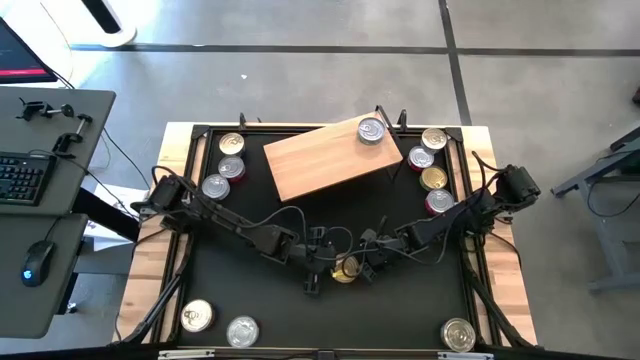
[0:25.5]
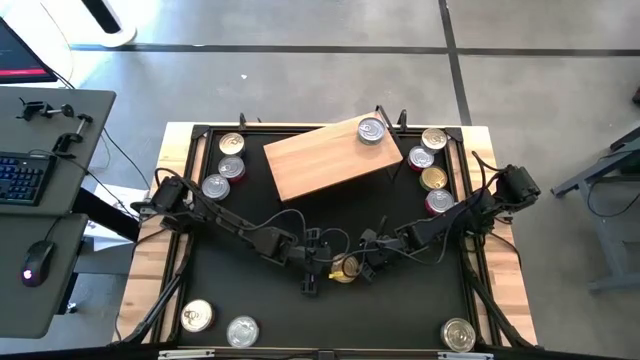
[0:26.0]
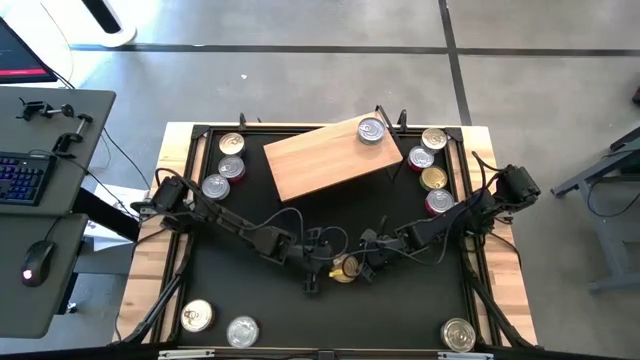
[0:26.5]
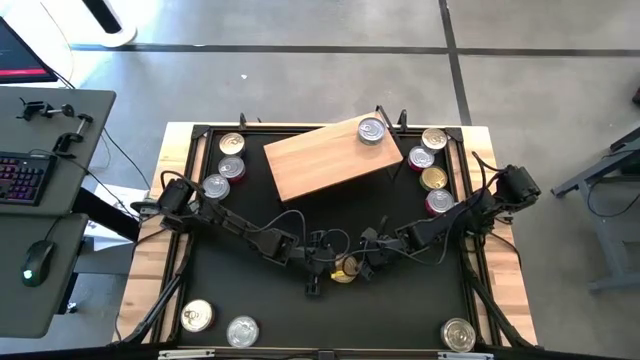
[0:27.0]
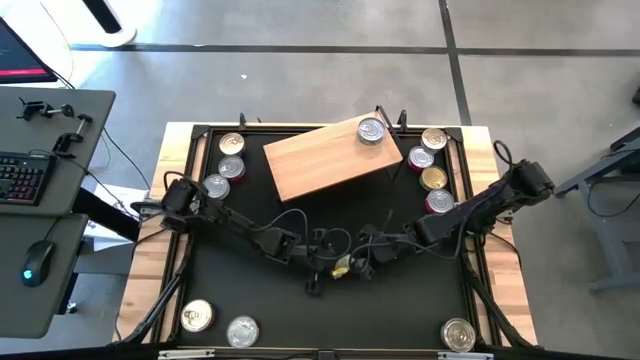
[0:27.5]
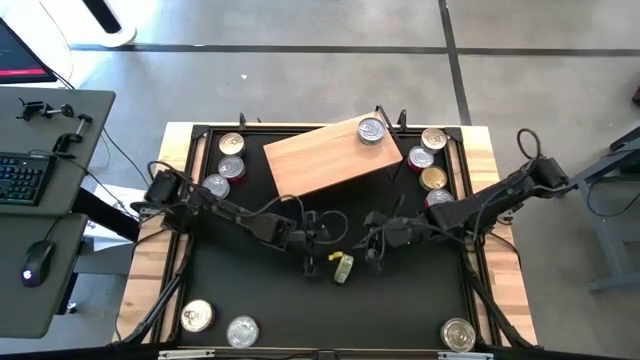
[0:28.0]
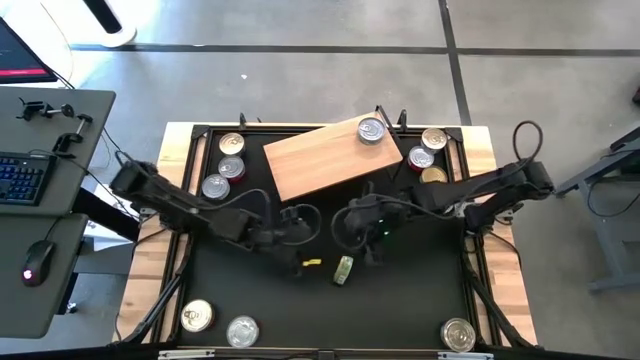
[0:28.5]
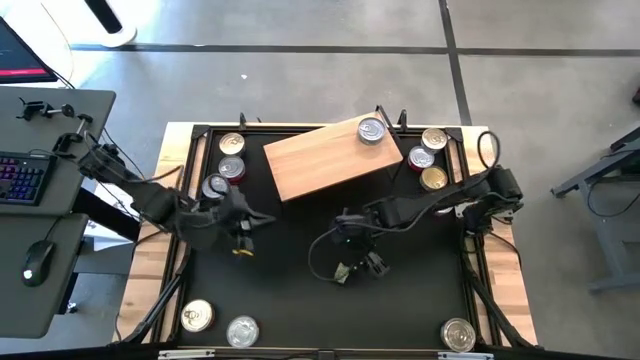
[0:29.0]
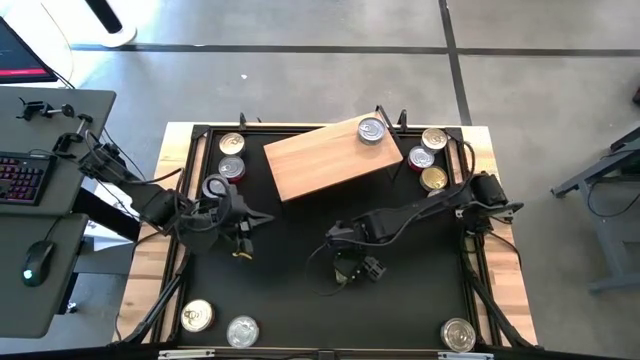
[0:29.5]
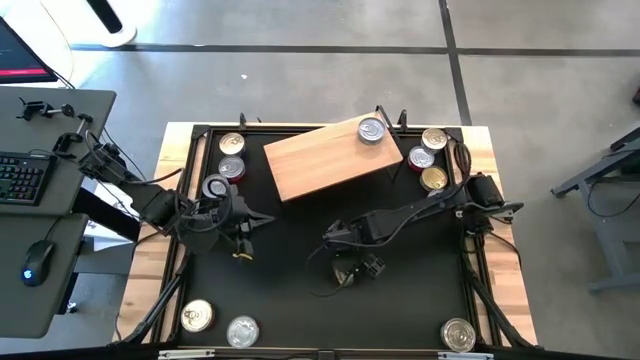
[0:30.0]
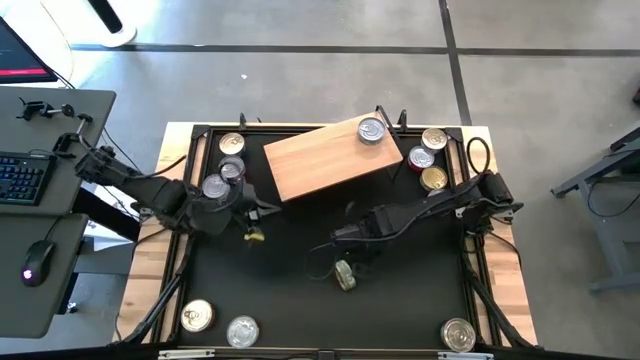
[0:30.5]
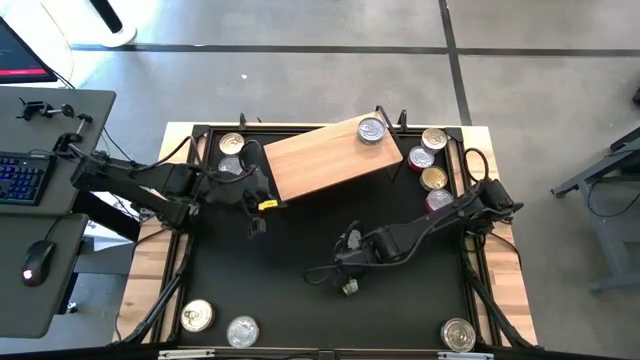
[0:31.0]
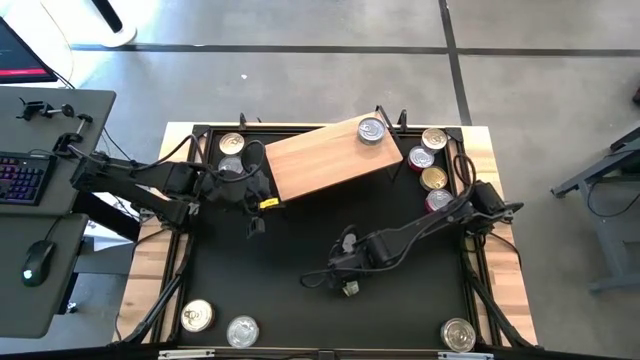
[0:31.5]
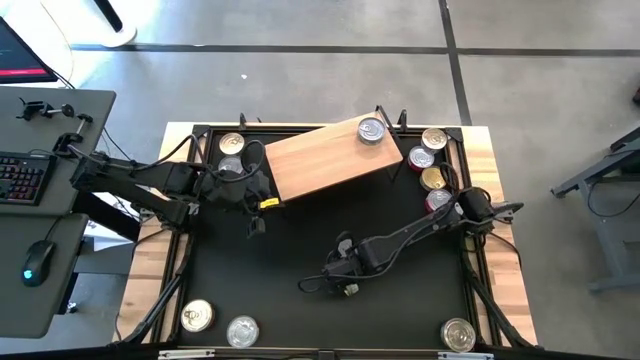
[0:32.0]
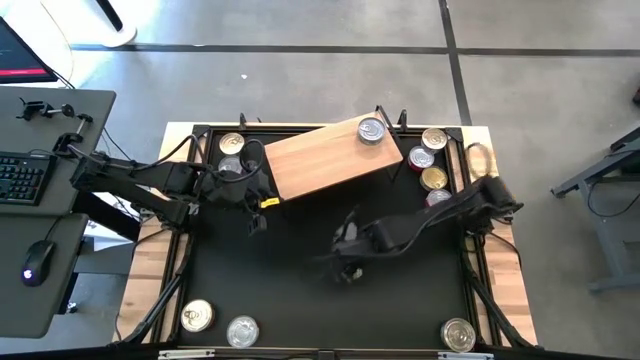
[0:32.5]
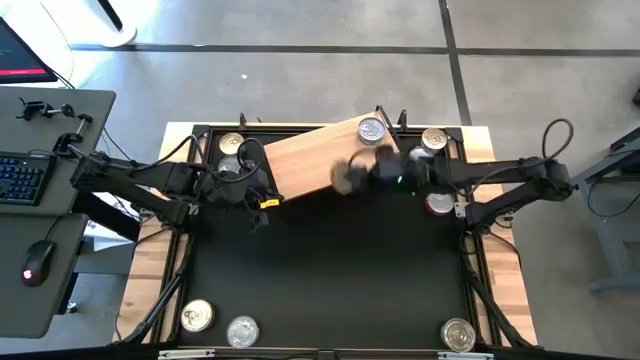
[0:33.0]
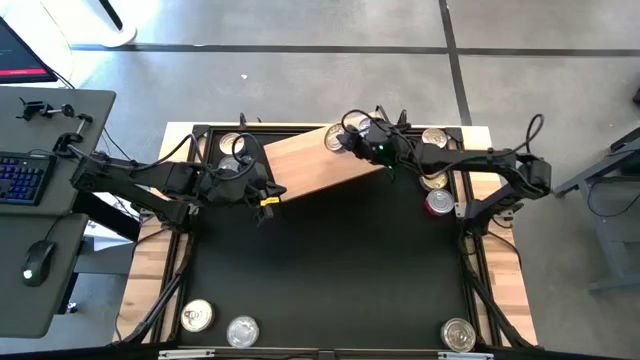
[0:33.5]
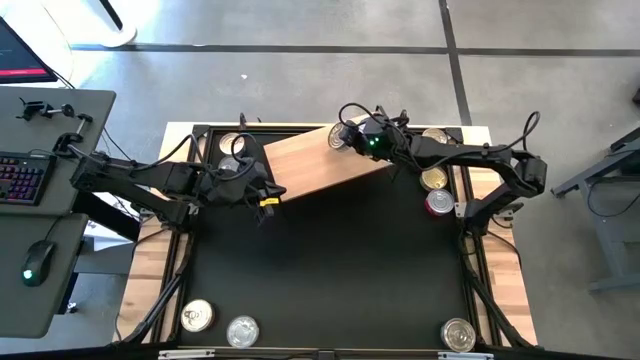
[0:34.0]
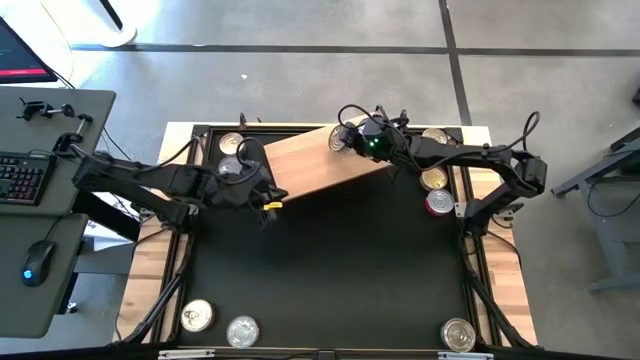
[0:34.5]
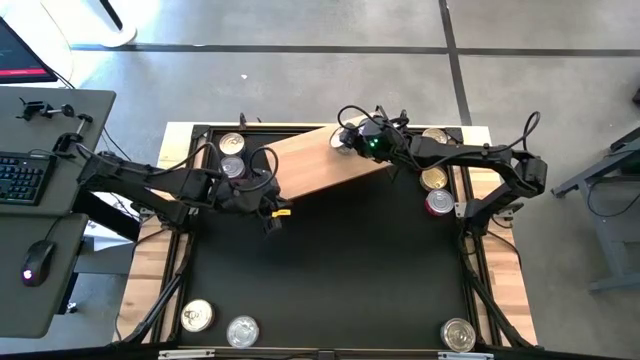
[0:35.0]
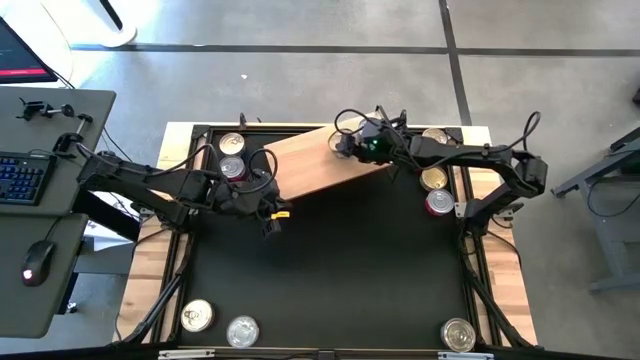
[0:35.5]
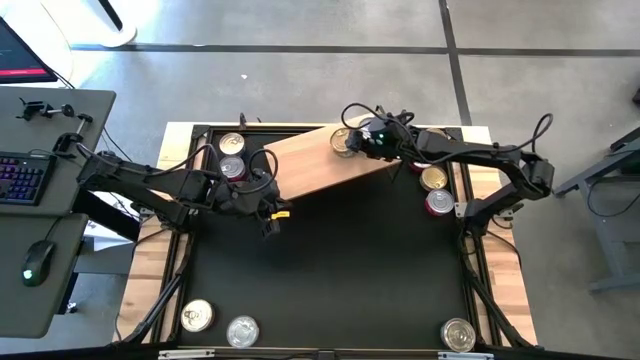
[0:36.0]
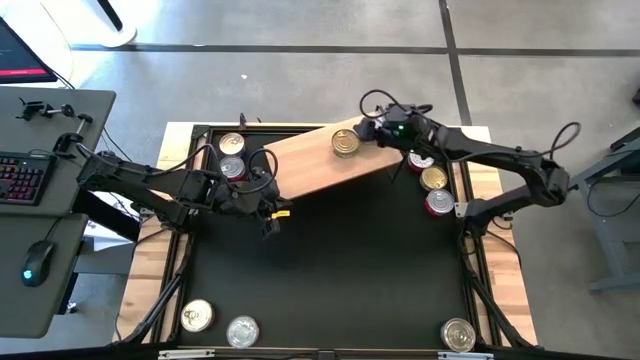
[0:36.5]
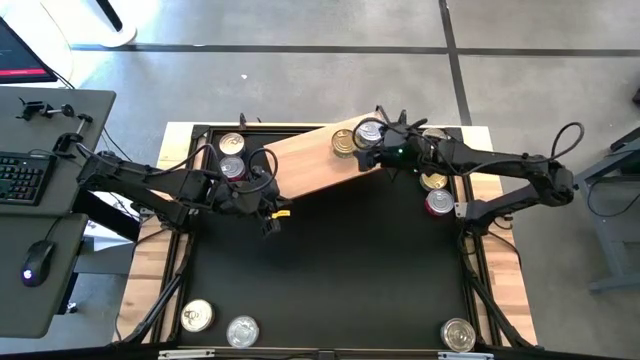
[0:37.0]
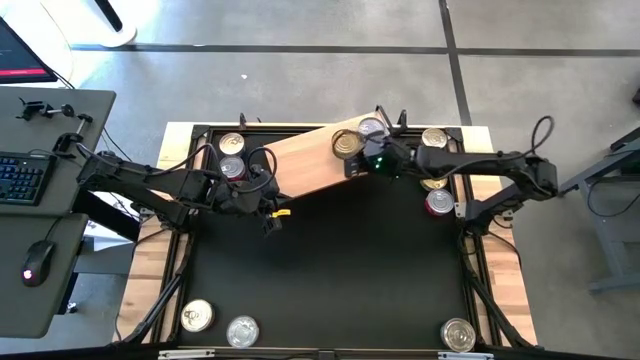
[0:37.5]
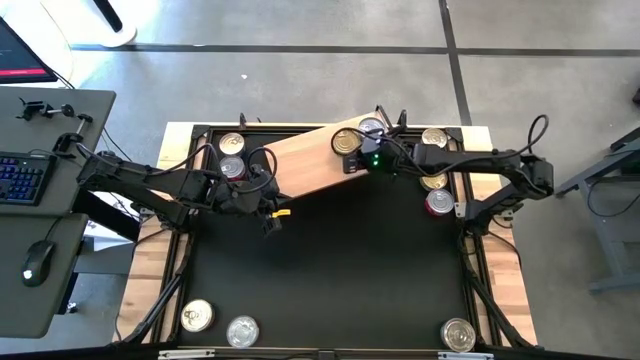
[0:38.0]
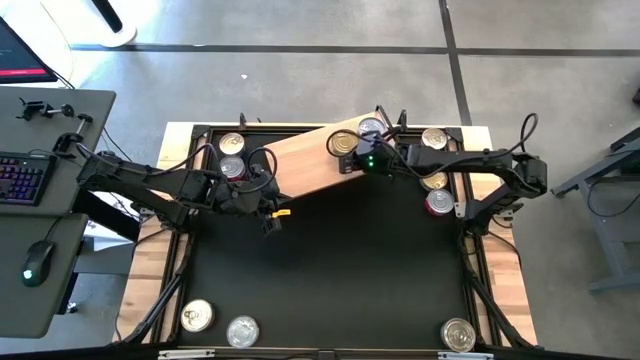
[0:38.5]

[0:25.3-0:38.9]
Task: Stack canned seafood by type on shelf
Put the bottom gold and green tuna can on the shelf

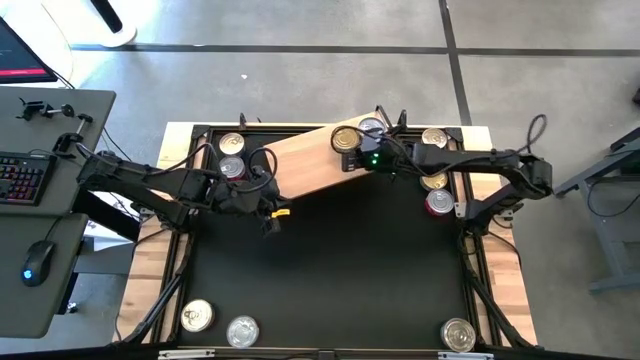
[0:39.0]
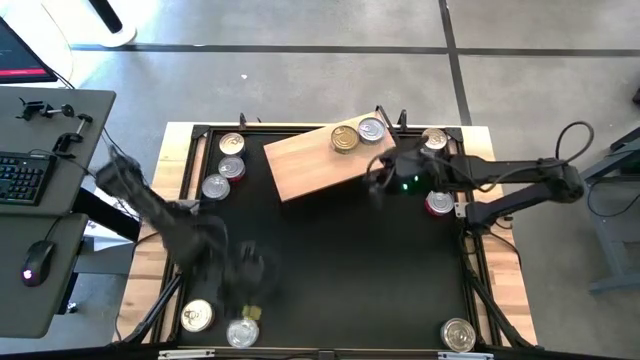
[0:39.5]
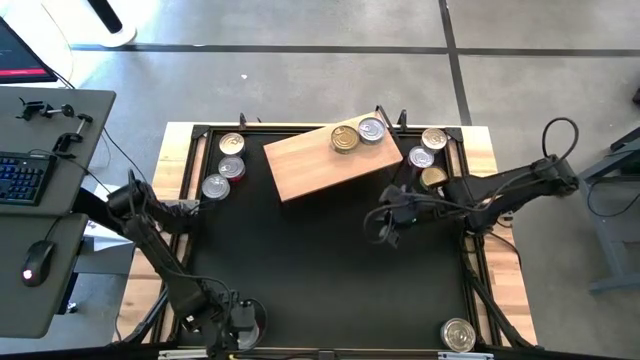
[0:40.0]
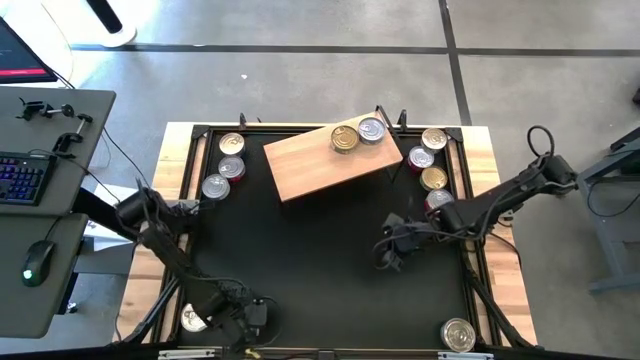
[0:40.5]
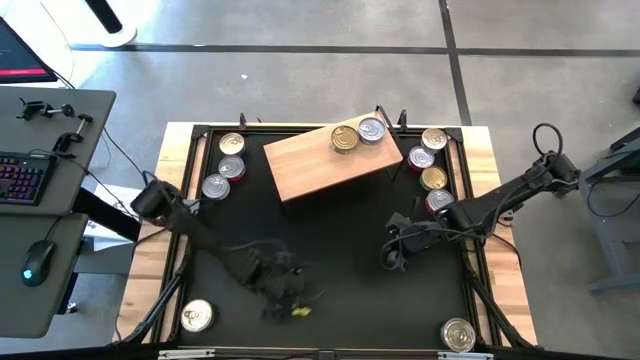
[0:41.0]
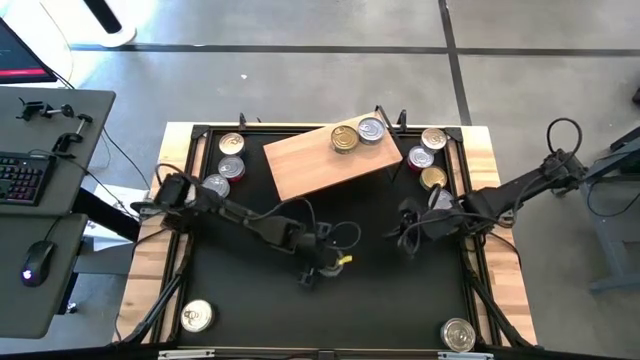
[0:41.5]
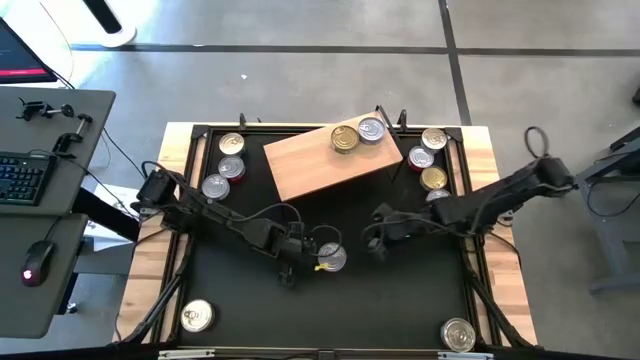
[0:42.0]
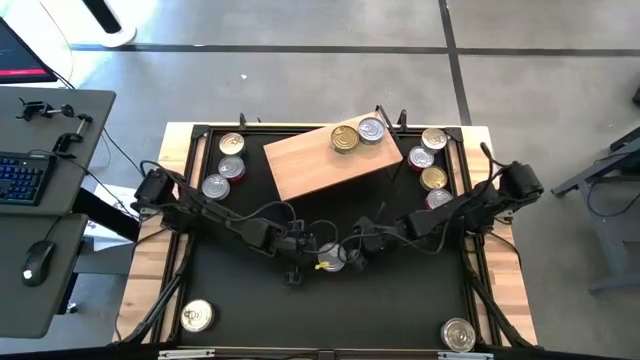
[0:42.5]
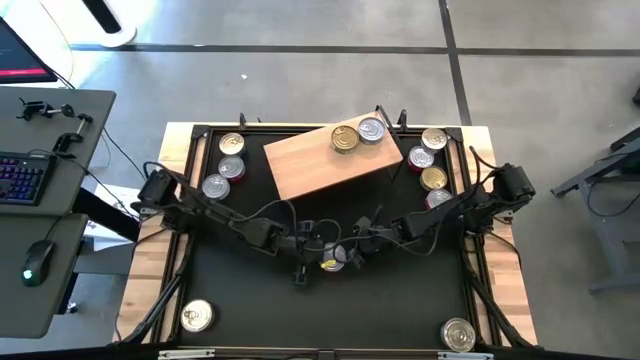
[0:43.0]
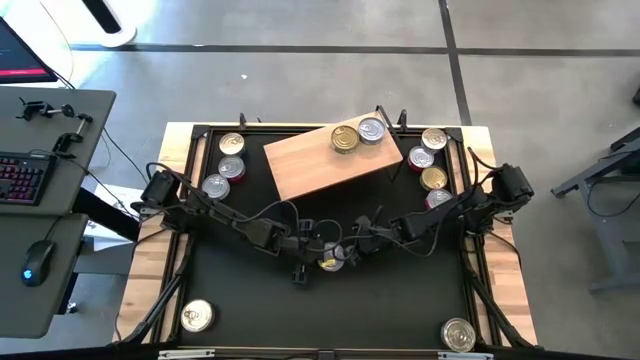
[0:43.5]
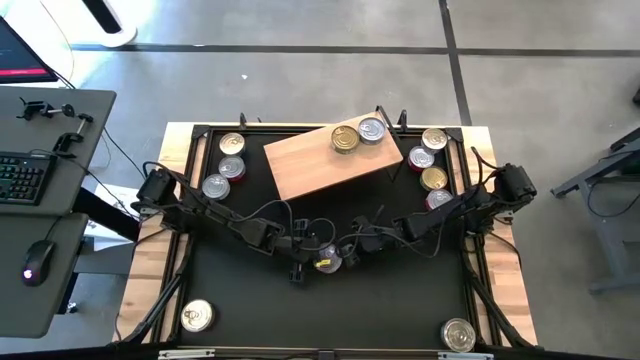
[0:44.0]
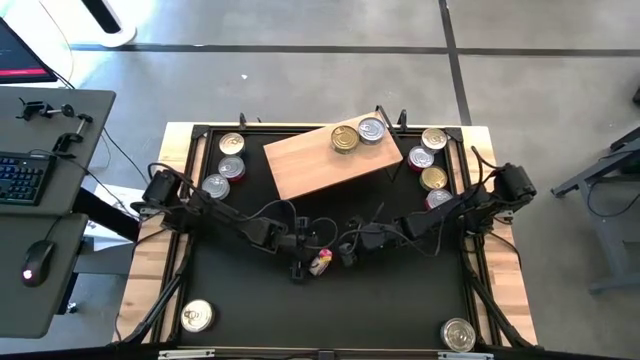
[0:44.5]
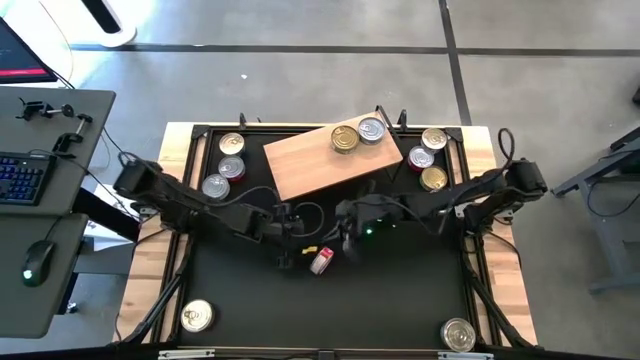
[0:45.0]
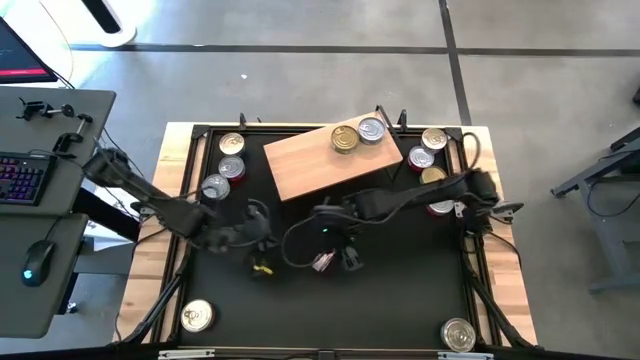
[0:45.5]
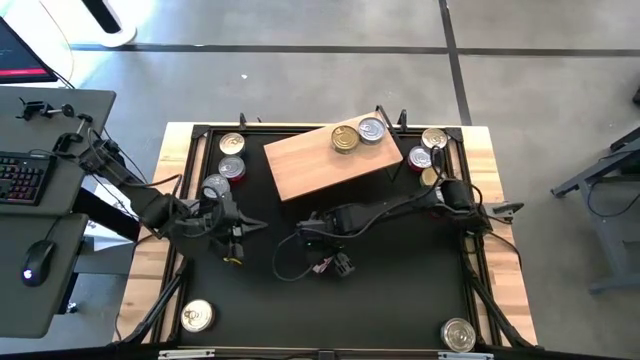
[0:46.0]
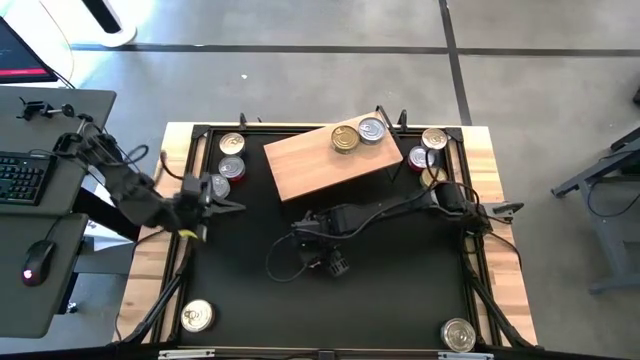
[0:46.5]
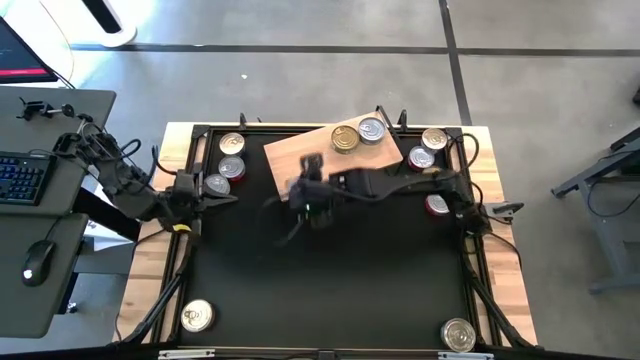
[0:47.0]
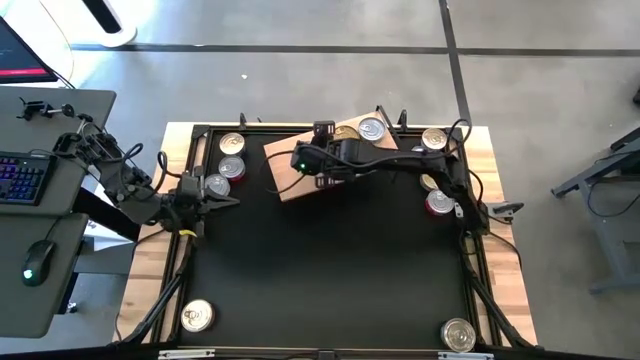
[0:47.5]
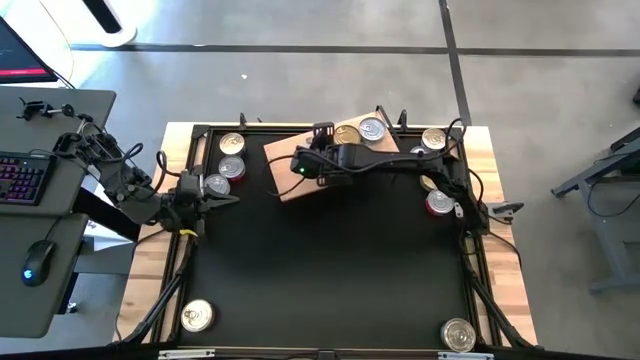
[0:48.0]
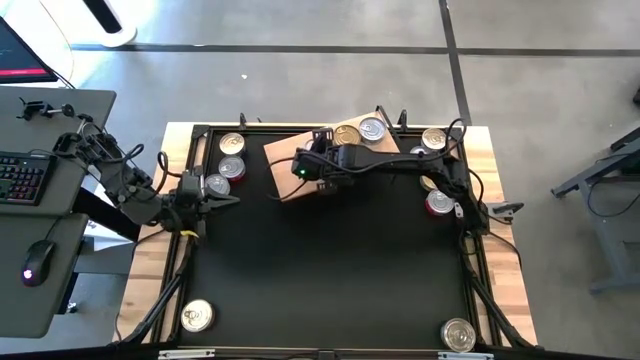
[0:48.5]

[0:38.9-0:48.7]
Put the bottom left red tuna can on the shelf
